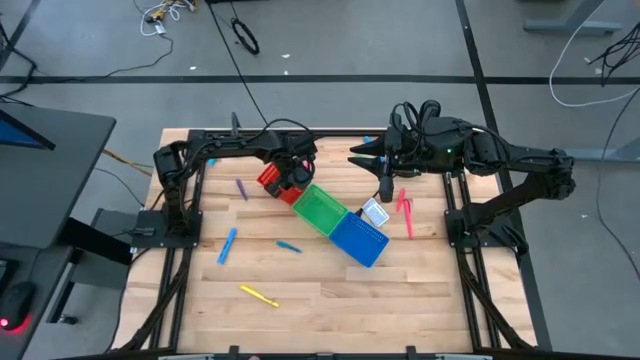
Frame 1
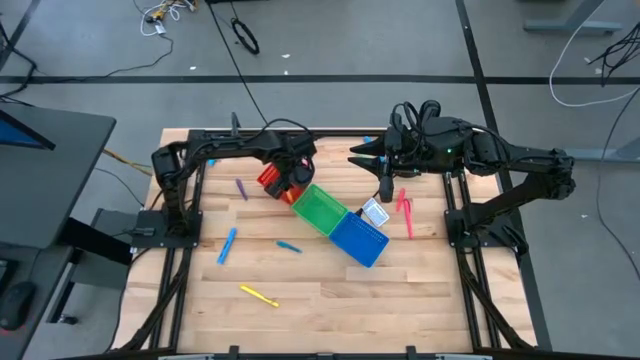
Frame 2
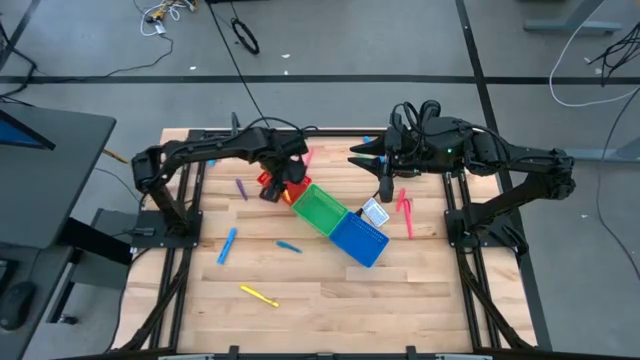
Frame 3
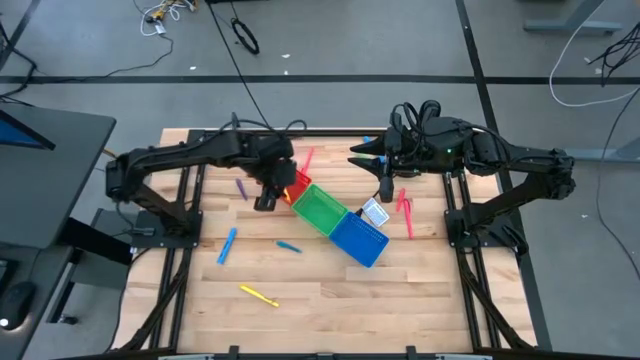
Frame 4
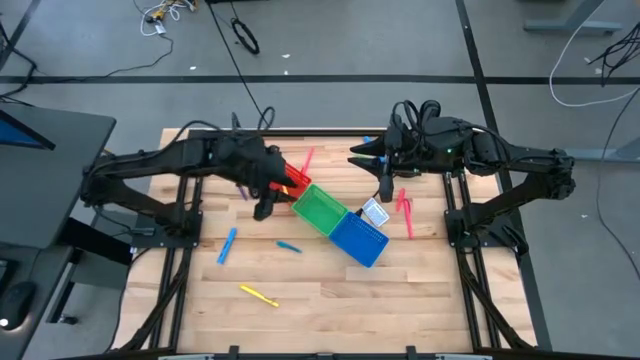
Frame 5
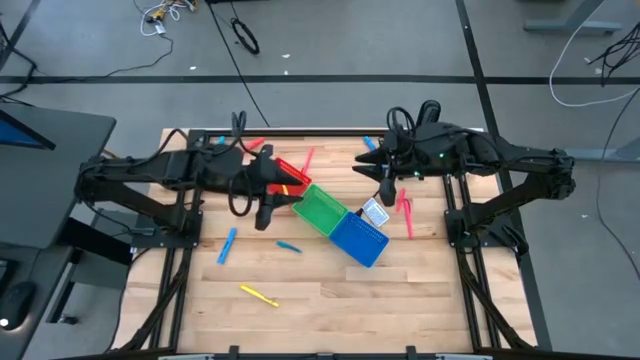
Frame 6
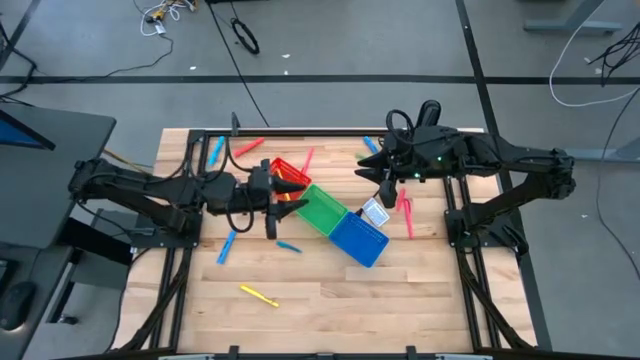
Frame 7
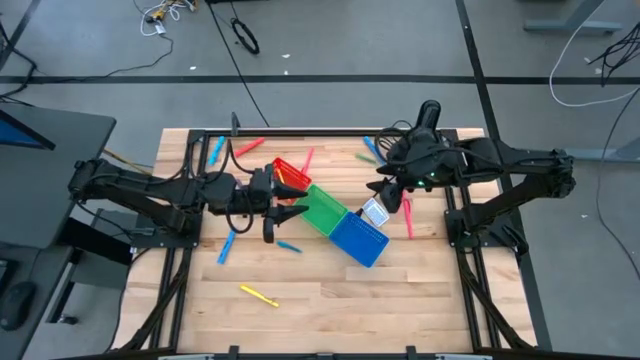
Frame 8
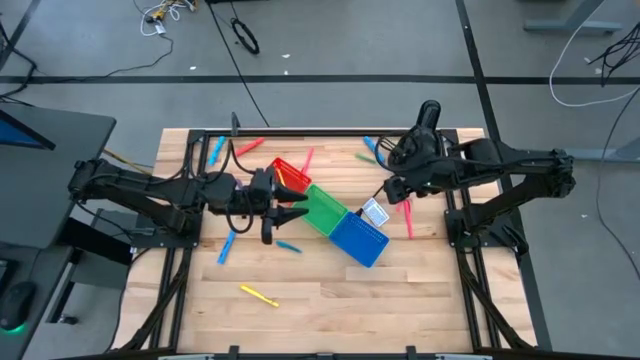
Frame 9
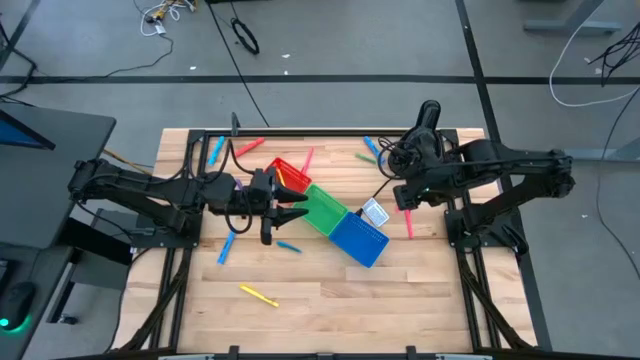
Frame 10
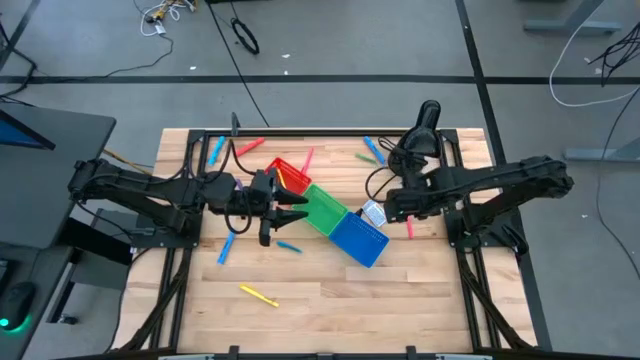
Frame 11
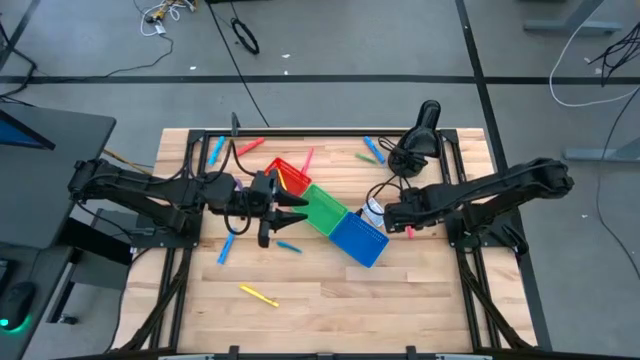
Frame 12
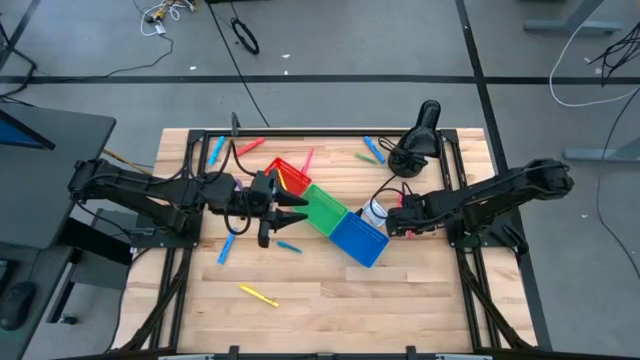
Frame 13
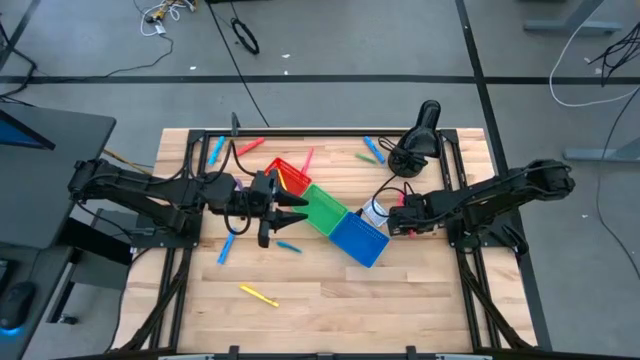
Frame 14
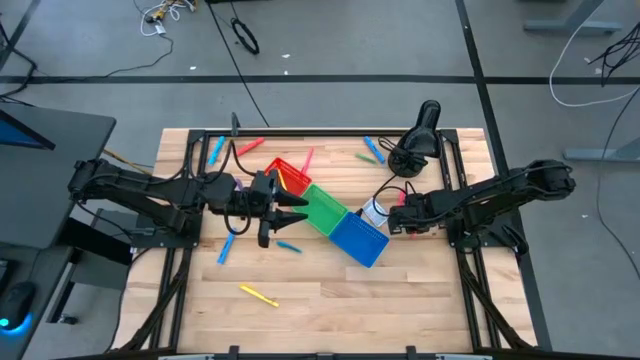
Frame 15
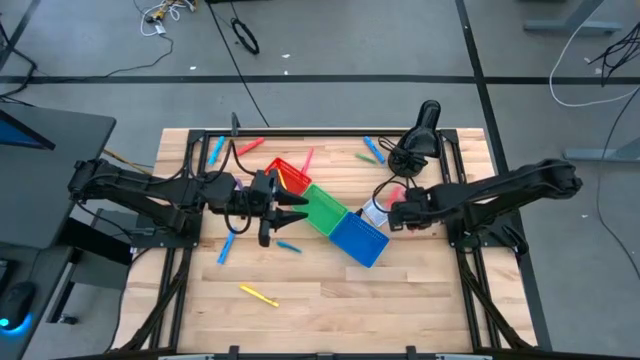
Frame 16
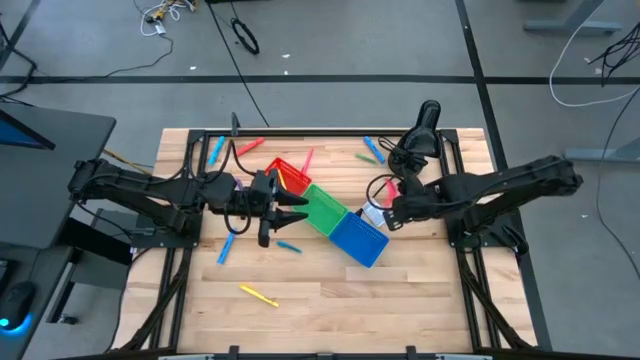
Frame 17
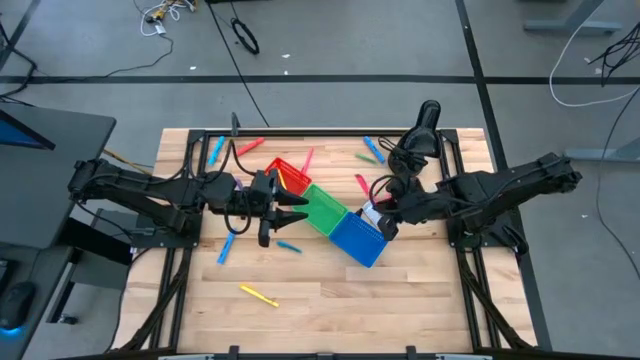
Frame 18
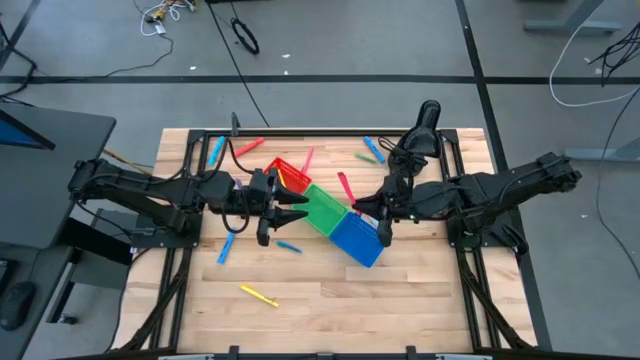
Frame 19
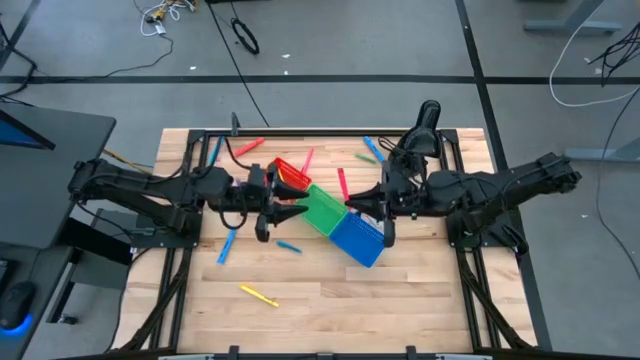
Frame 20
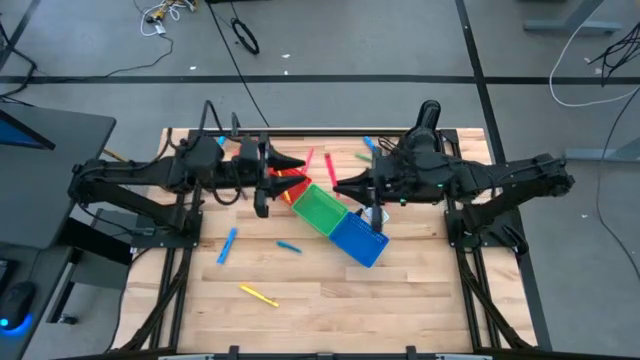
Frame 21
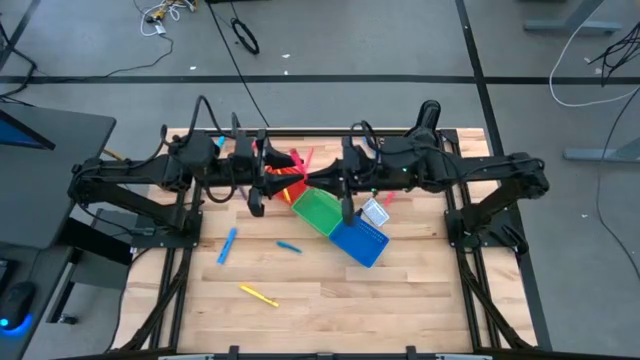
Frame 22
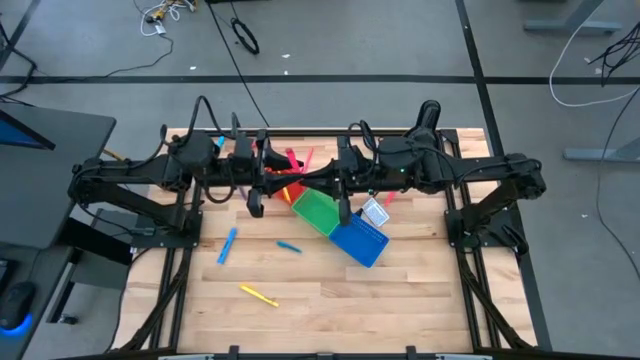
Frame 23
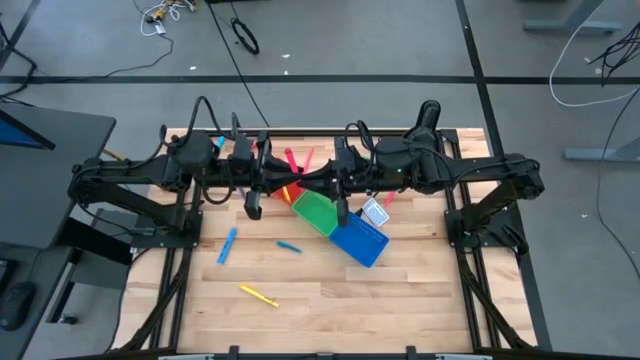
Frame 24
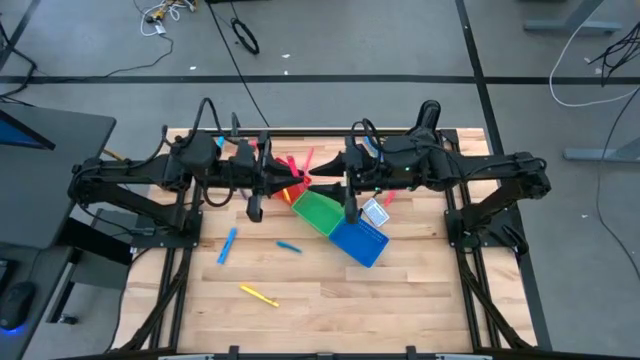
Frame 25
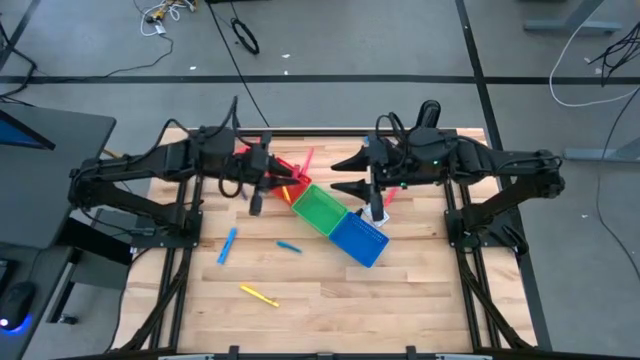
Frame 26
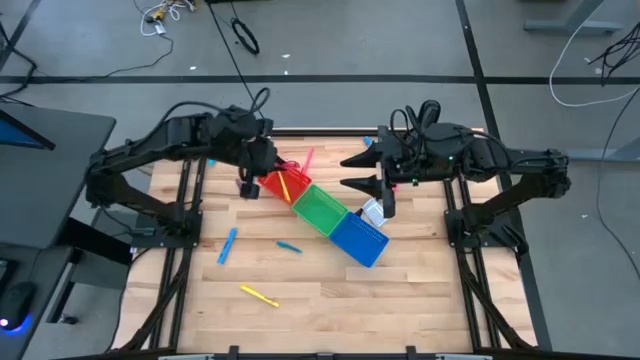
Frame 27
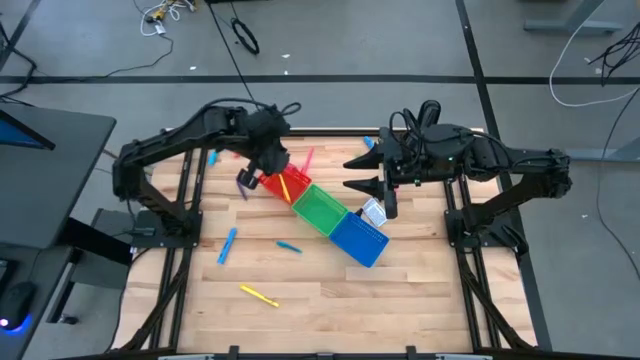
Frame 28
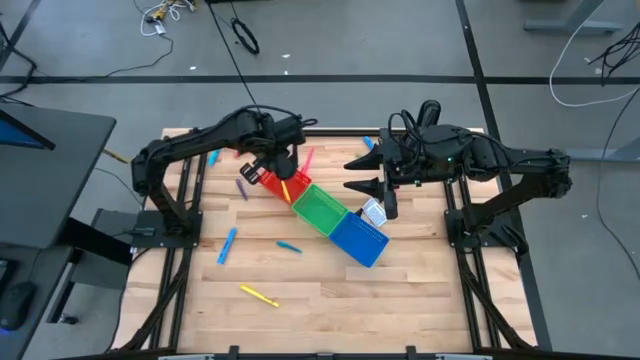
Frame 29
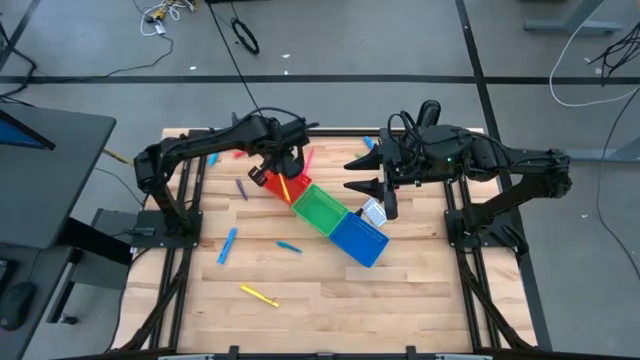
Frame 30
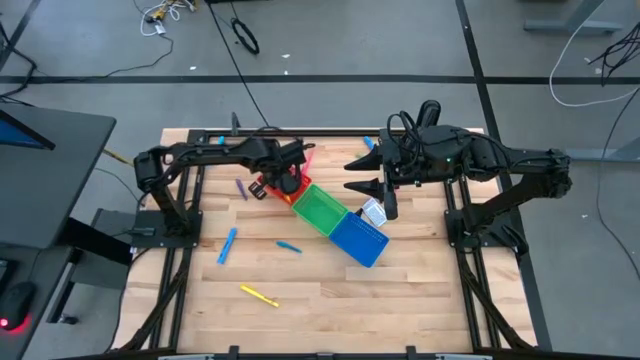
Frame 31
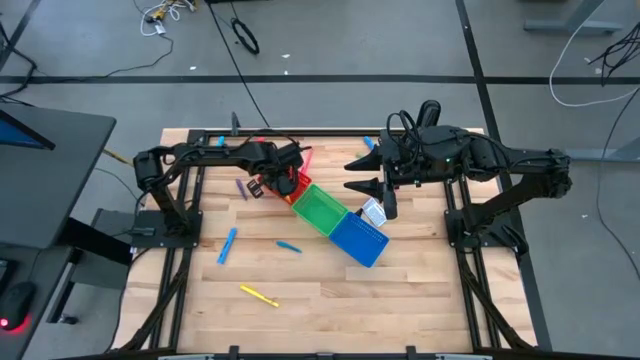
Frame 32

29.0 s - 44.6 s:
Task: Pick & Place Markers
Put the bottom pink marker pen into the red bin

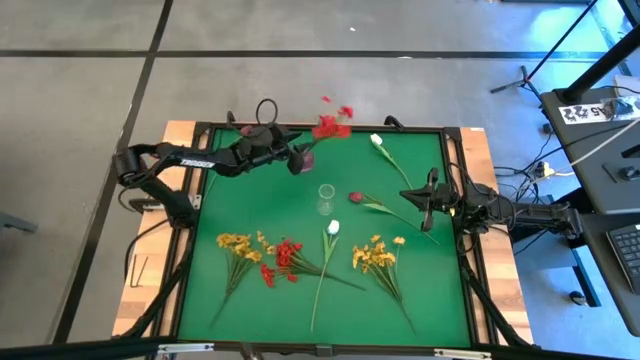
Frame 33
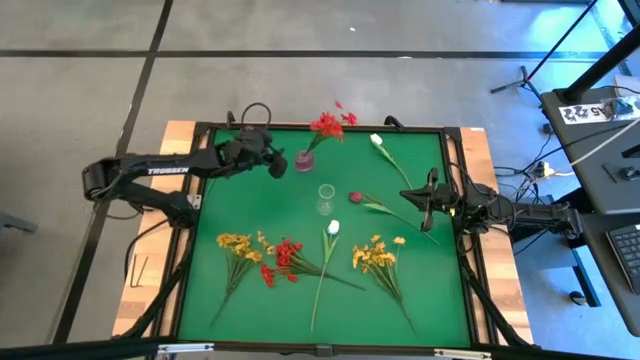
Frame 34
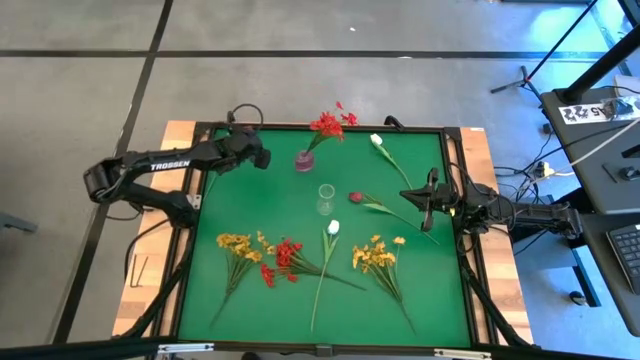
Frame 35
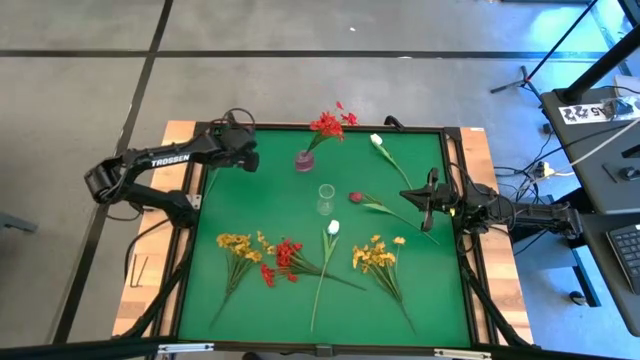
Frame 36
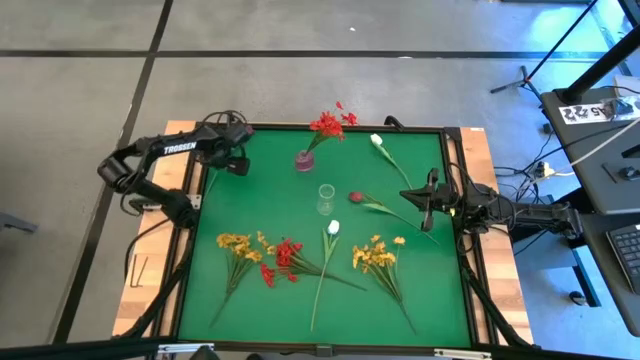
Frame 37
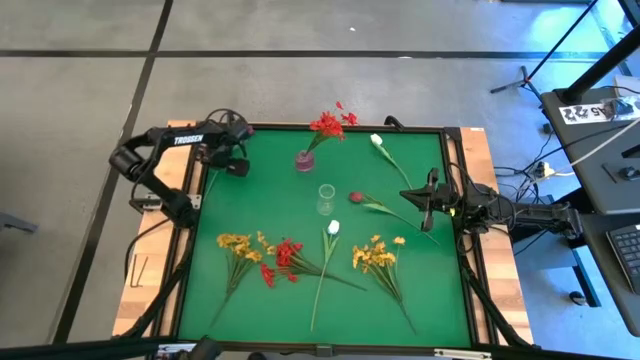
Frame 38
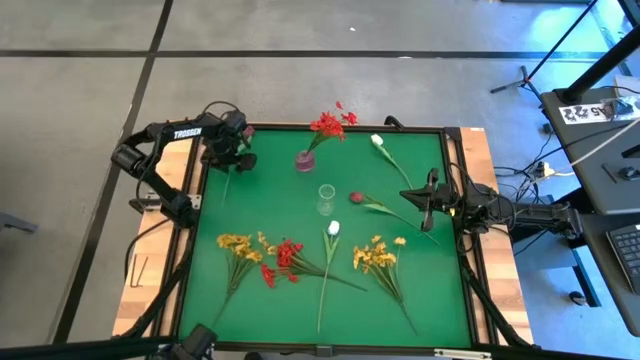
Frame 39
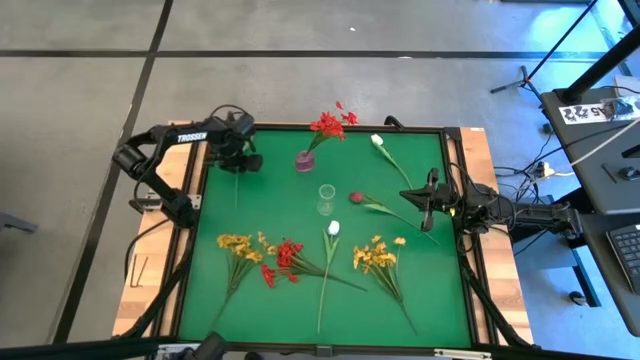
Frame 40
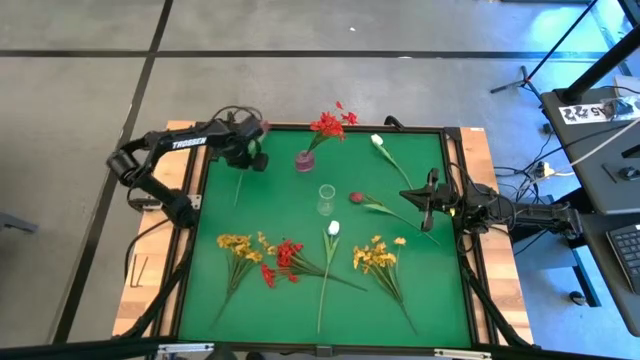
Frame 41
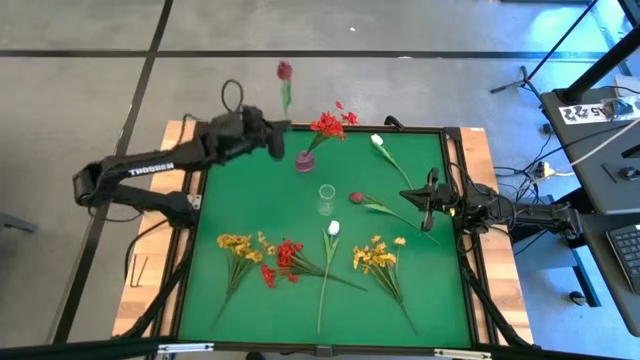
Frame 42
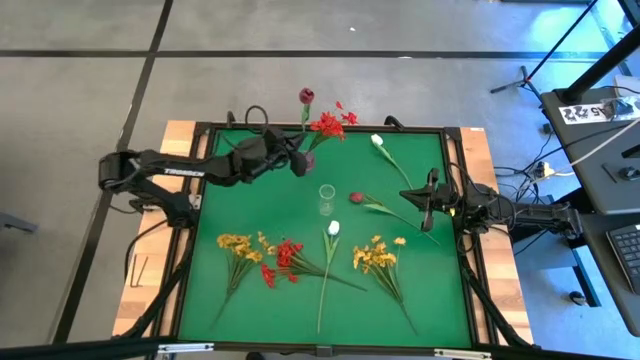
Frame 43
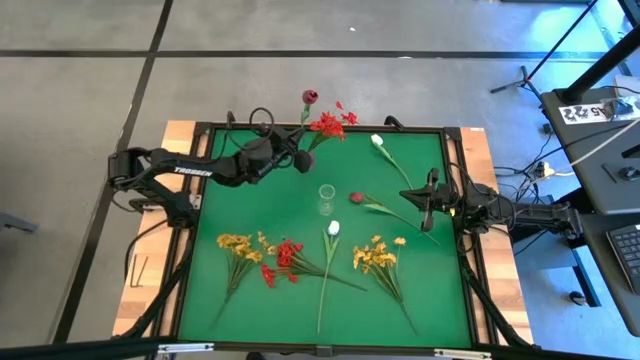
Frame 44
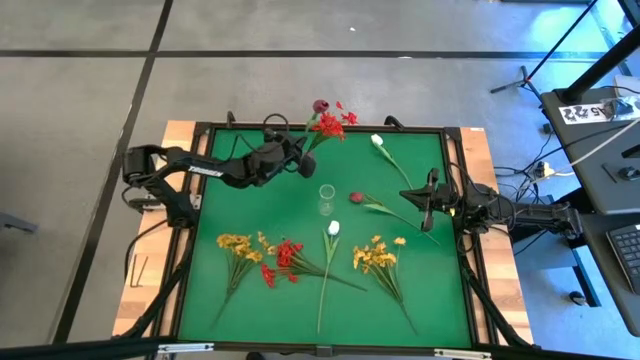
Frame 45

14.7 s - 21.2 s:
Task: Sort flowers into vase by color
Put the dark red flower into the purple vase
